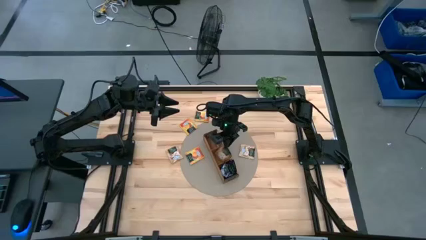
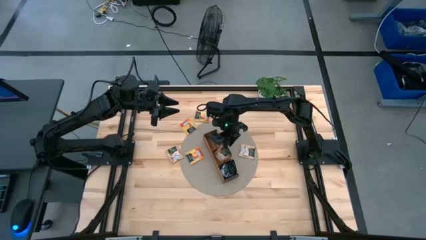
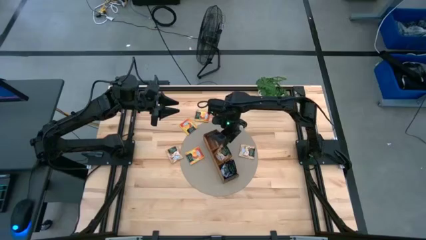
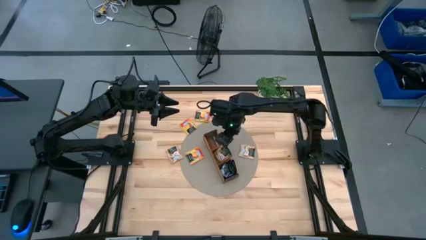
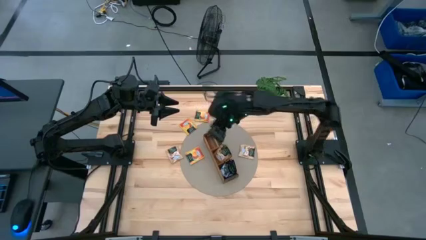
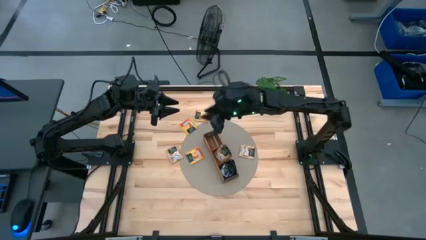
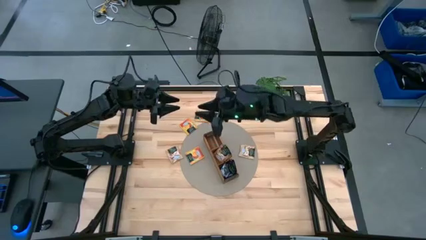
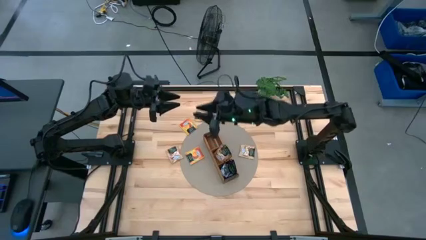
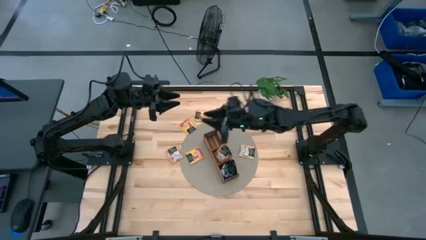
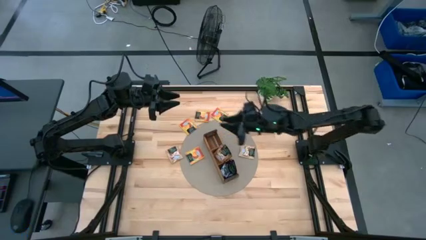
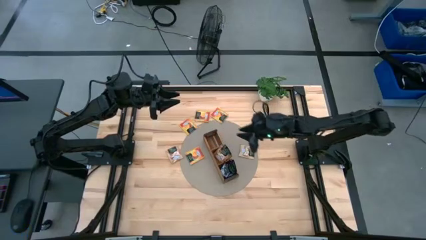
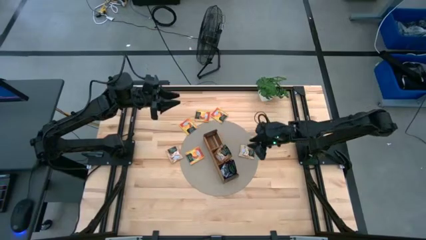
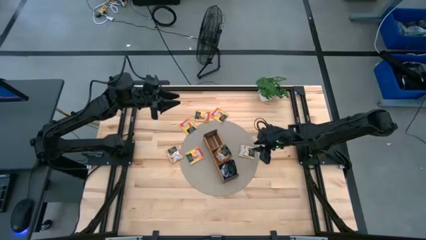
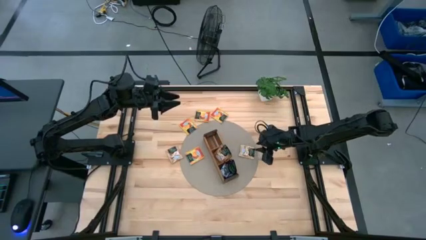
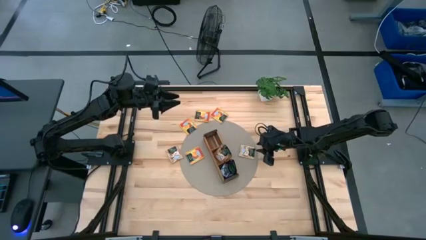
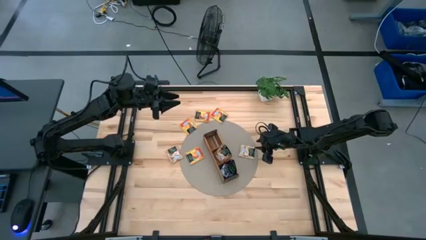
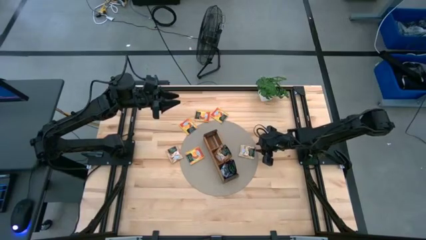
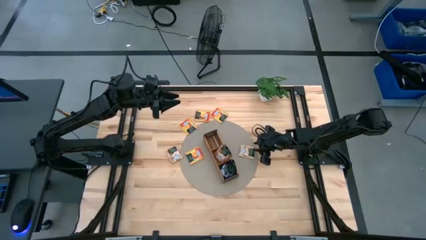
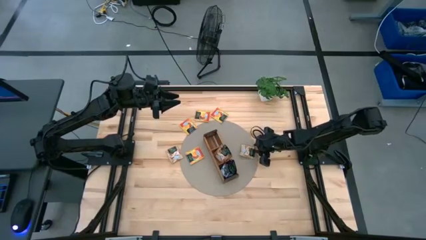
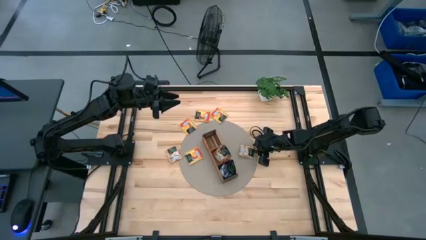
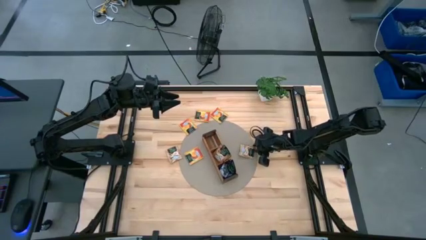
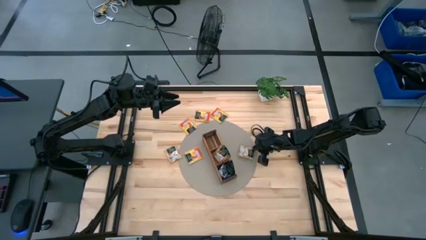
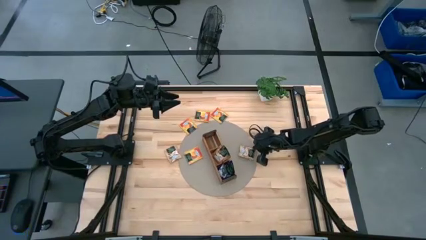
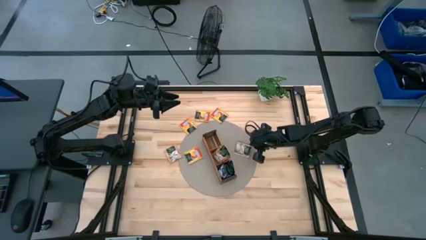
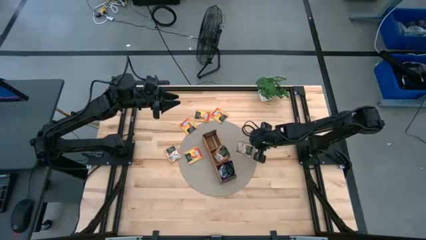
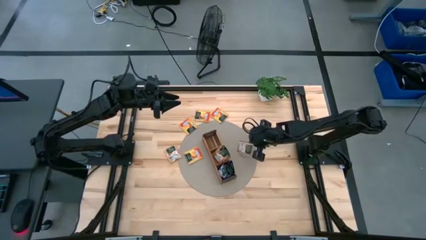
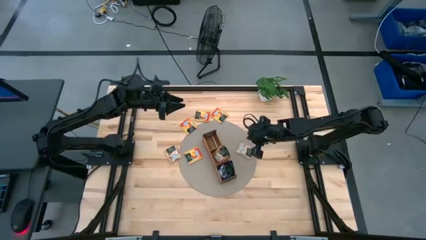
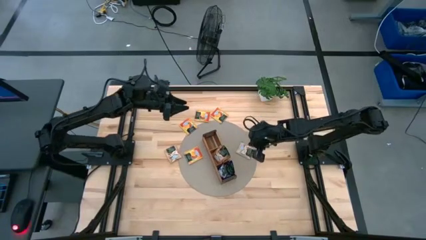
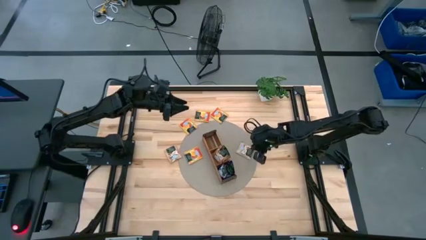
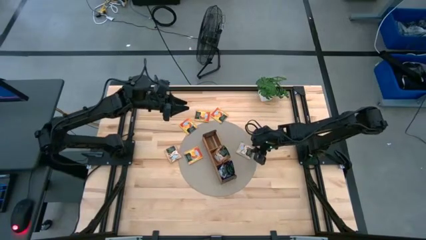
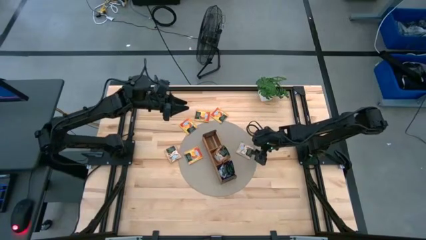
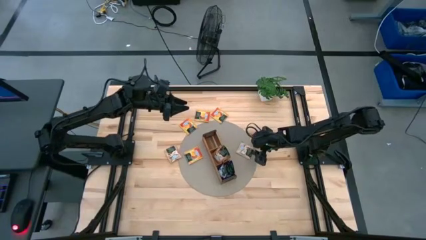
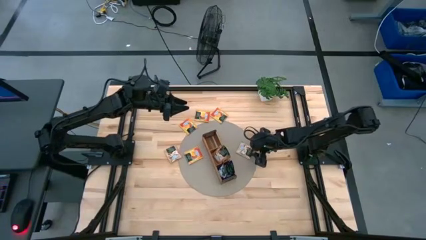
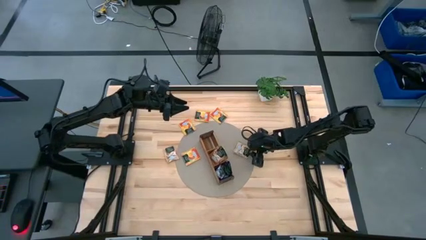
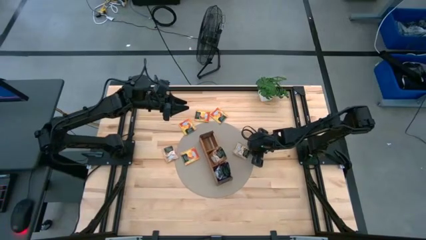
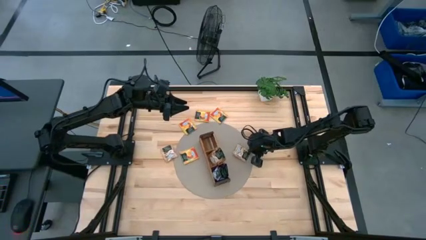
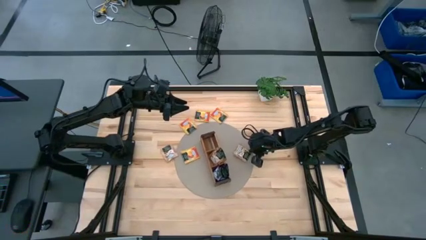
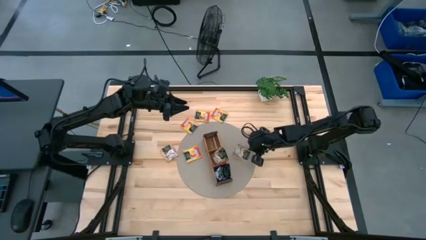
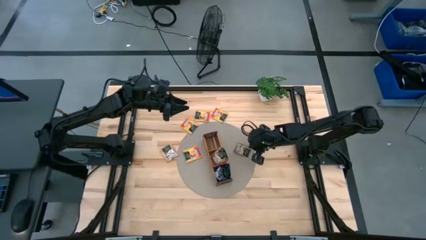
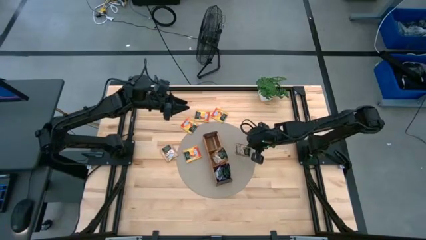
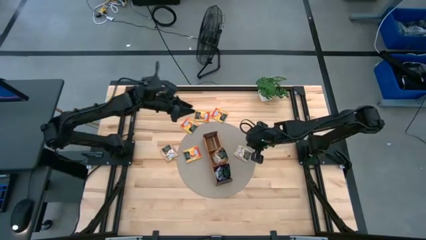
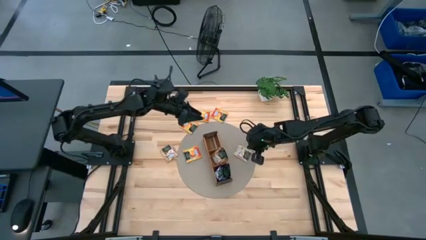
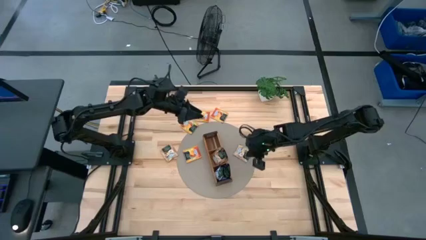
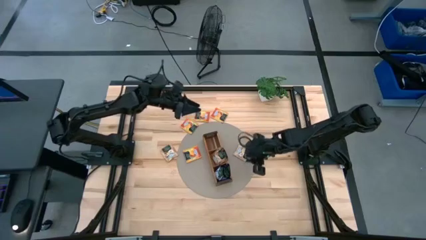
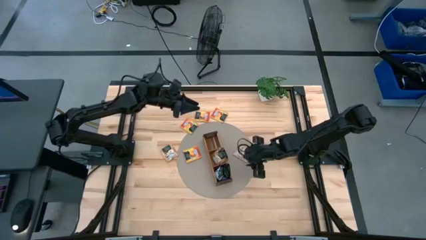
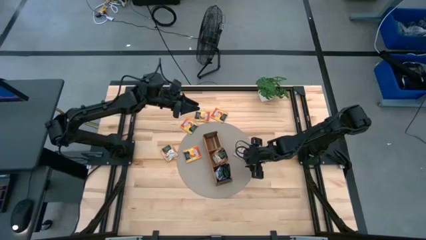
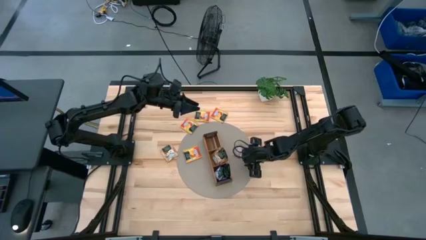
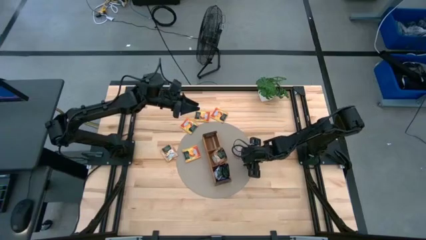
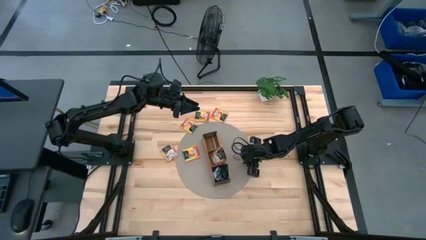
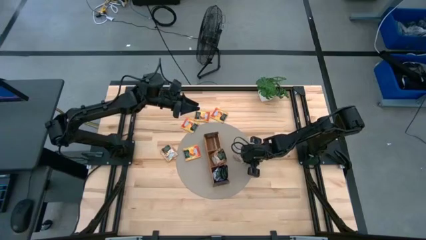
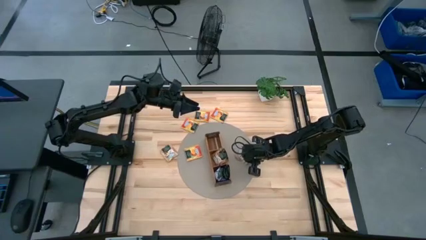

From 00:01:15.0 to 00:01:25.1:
Task: Pick & Place Tea
Put the brown tea bag into the middle section of the wooden organizer

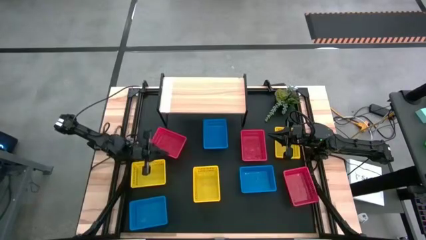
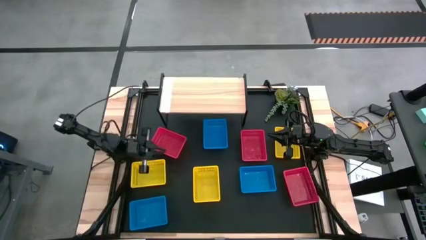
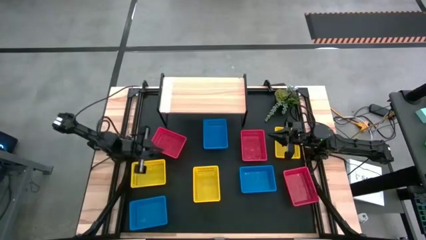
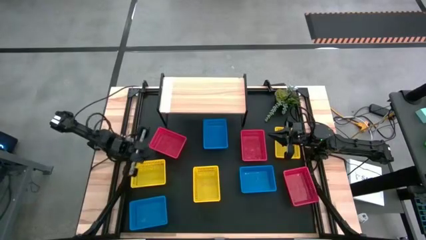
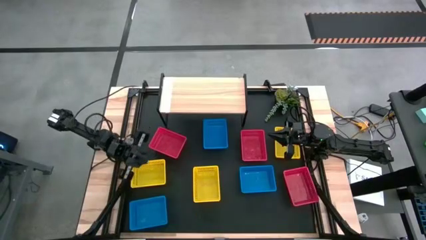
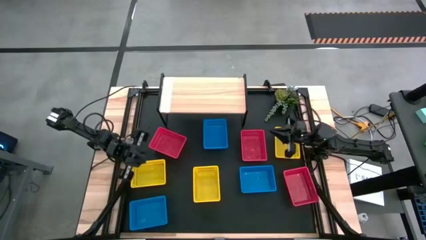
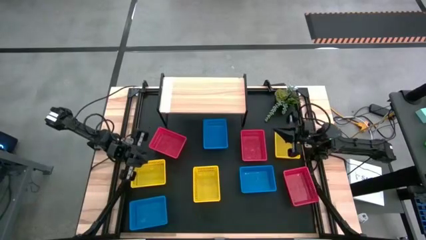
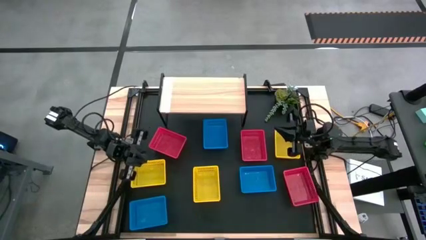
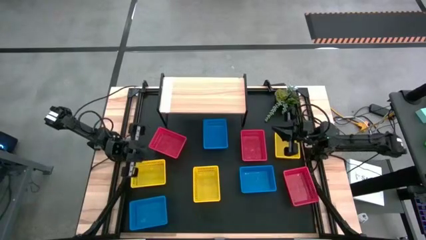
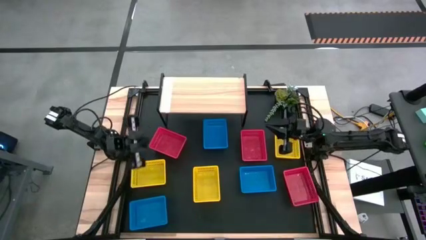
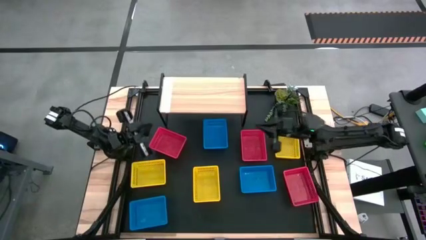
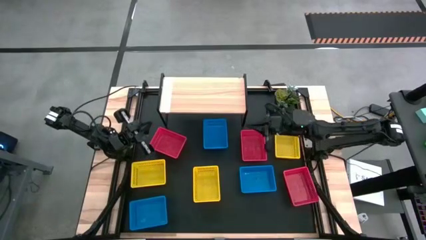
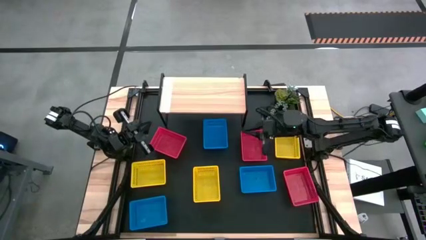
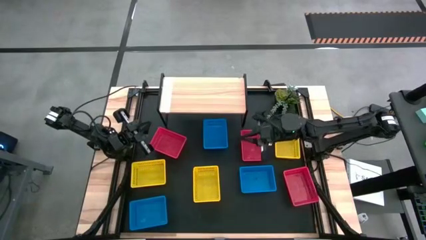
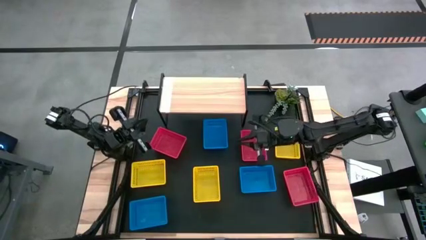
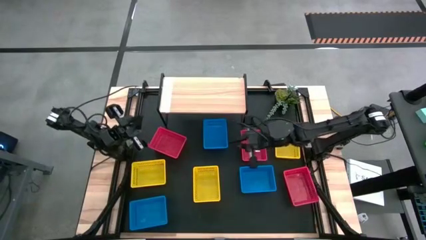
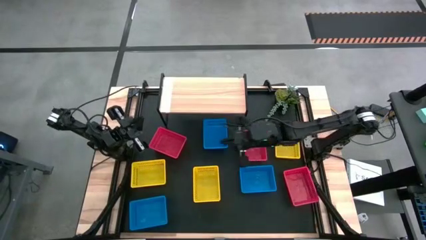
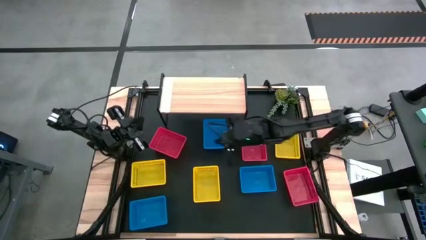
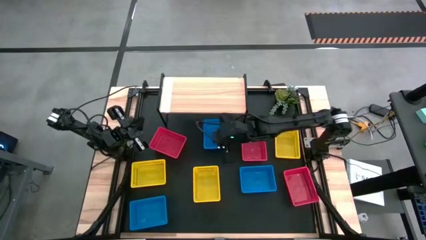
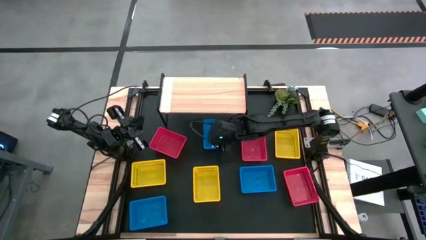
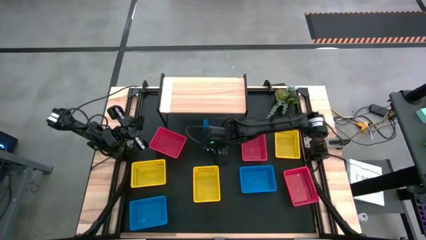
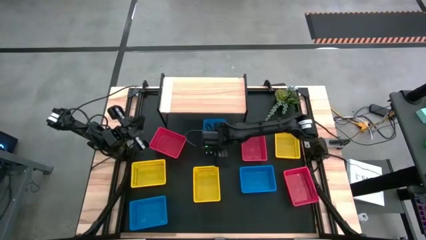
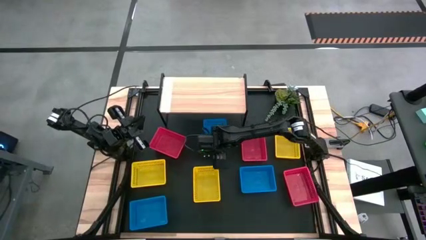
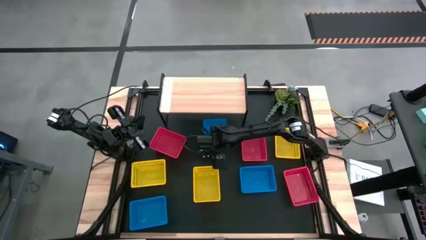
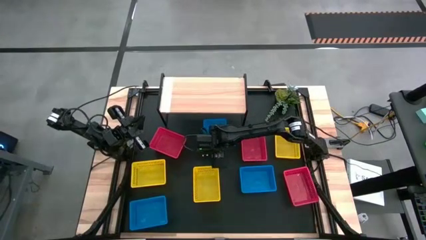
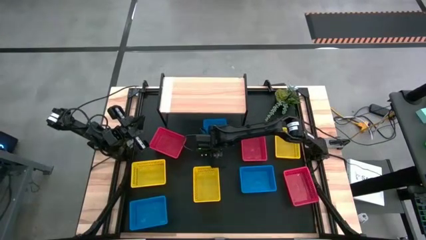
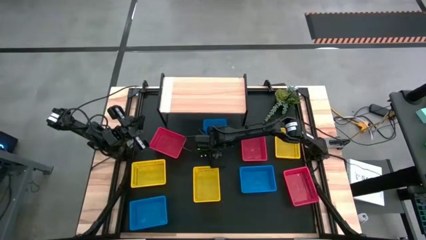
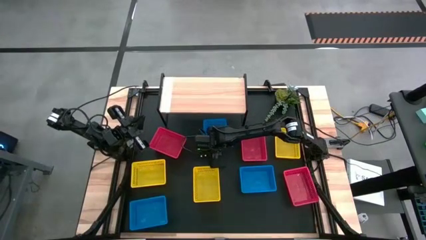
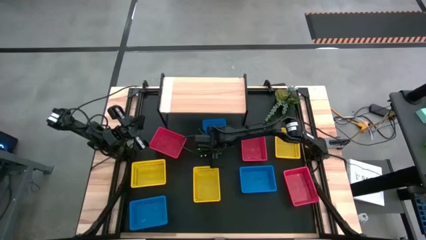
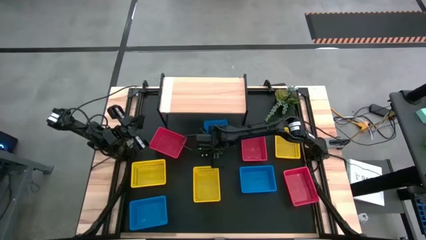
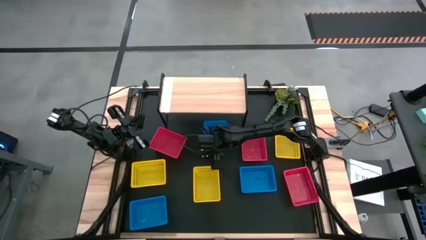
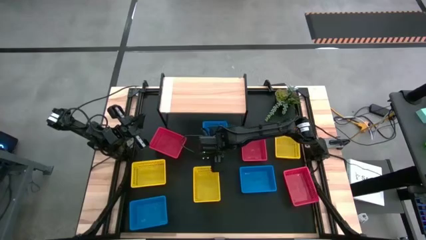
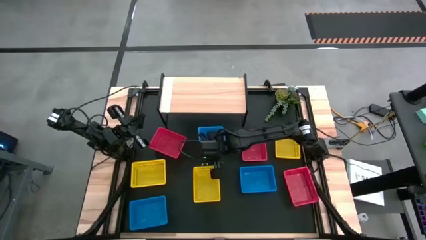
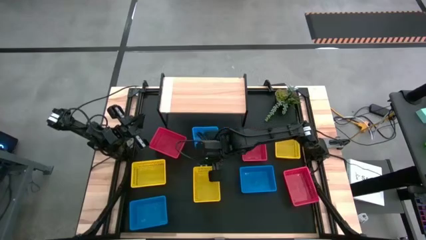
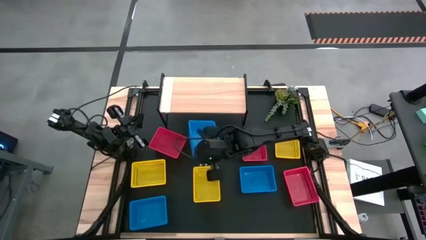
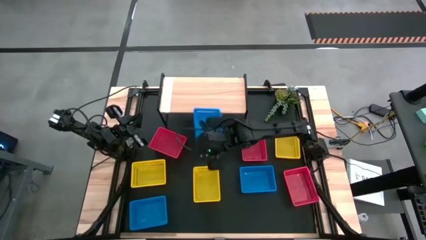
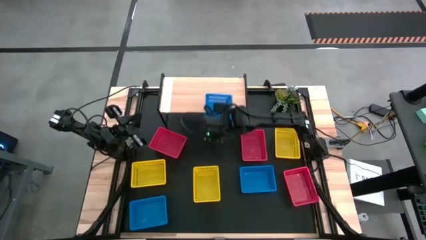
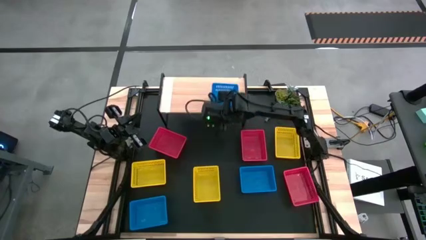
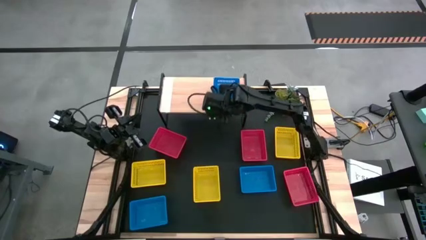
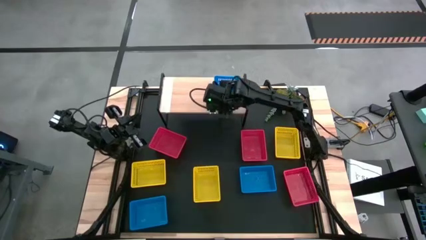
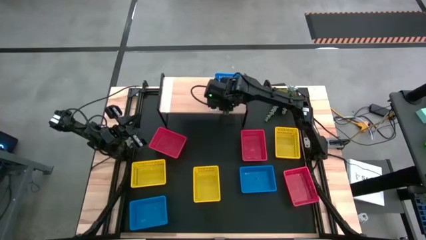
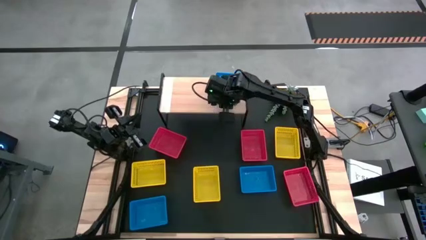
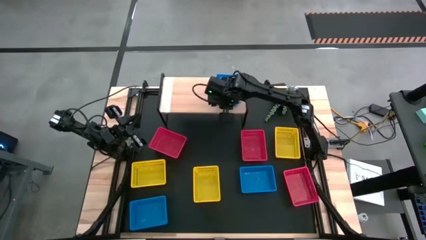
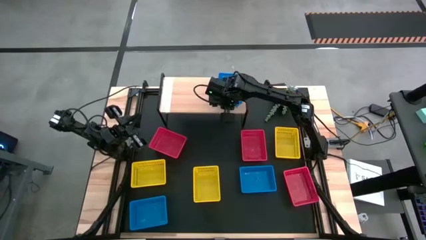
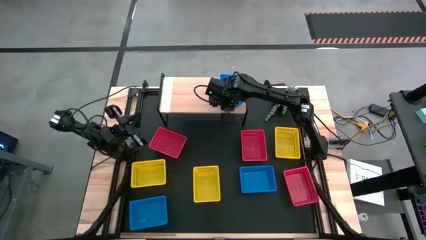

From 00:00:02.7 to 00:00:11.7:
Task: Stack baskets on shelf by color
Put the top blue bin on the shelf
